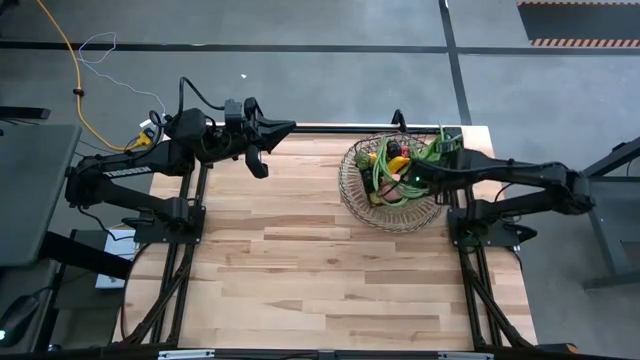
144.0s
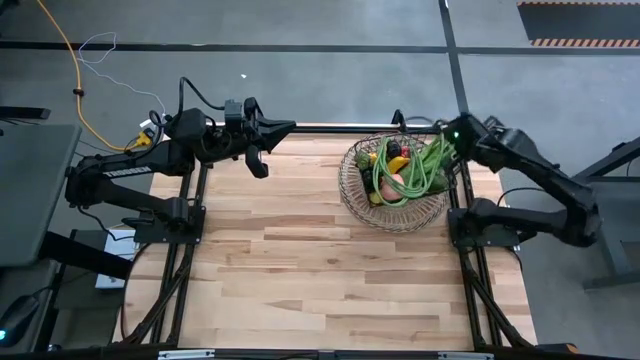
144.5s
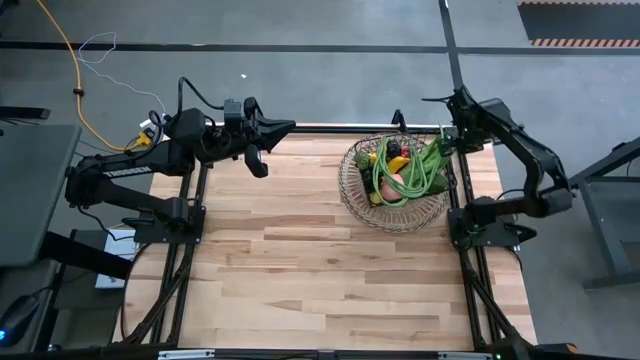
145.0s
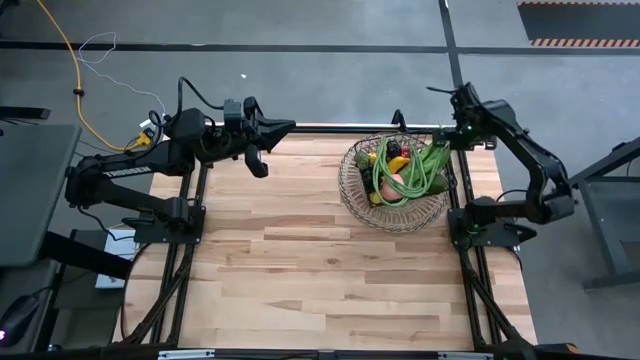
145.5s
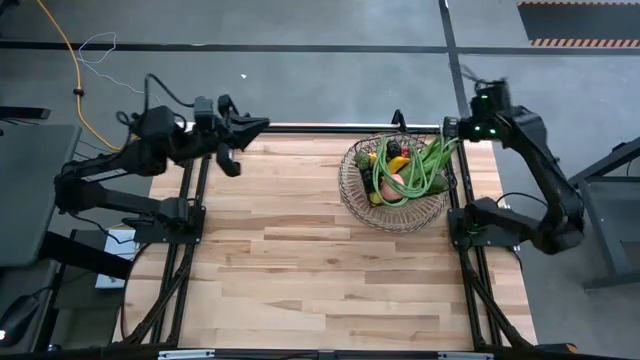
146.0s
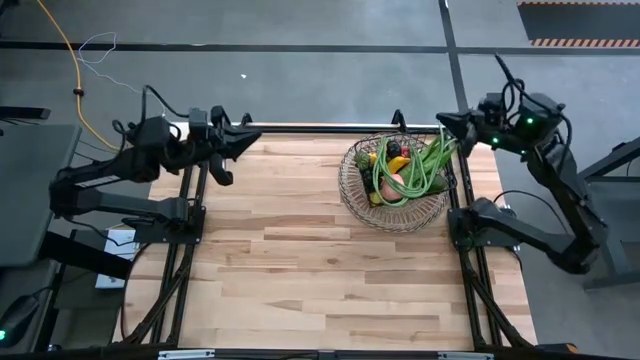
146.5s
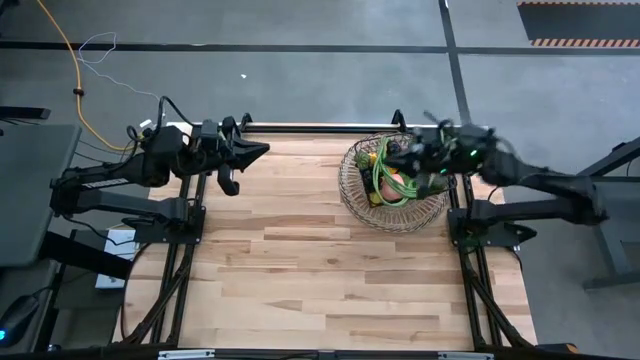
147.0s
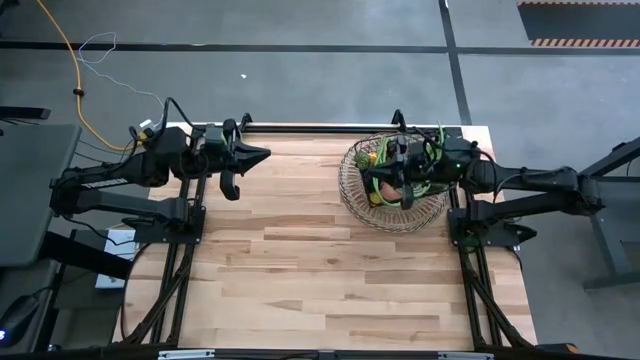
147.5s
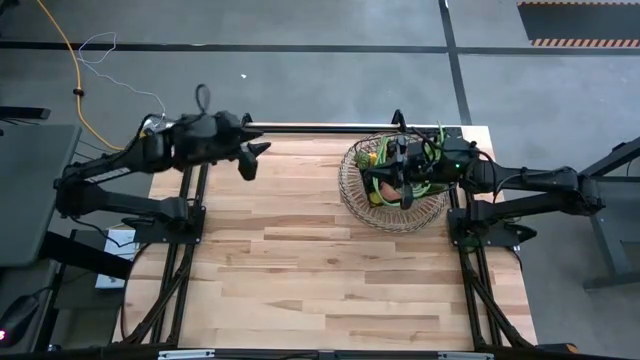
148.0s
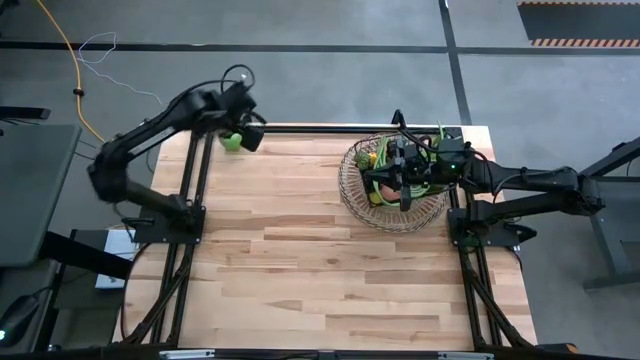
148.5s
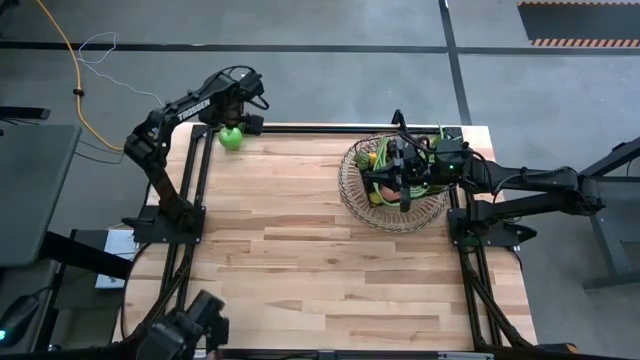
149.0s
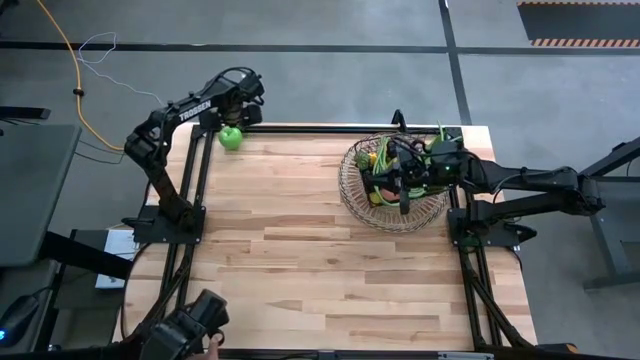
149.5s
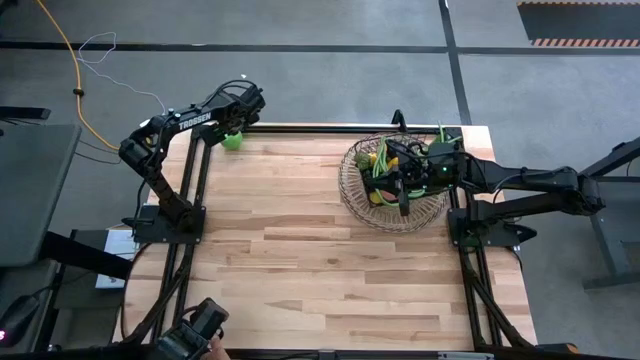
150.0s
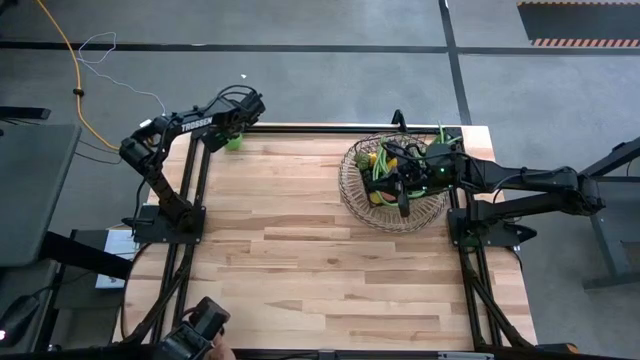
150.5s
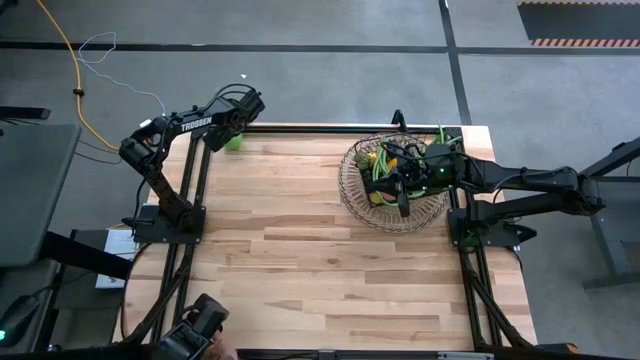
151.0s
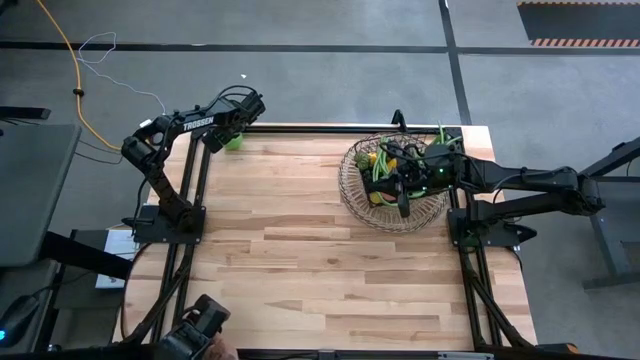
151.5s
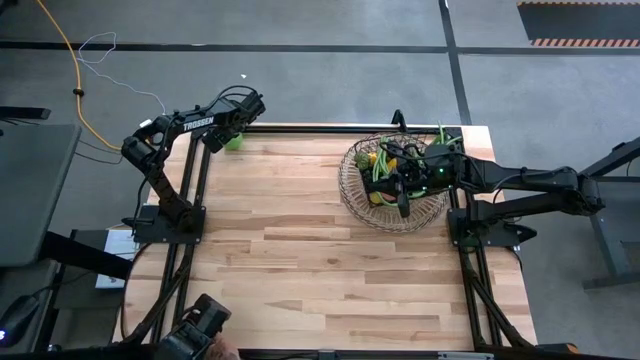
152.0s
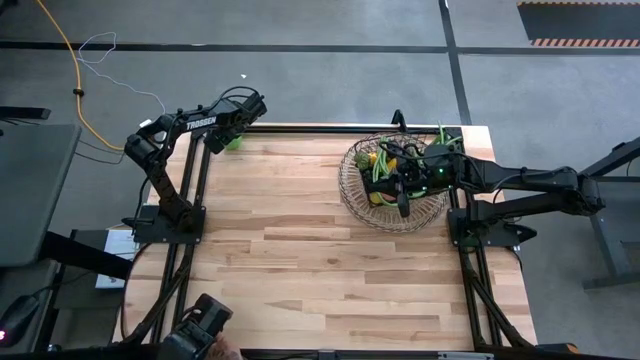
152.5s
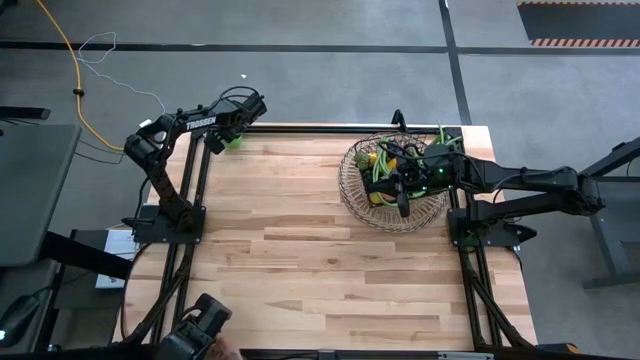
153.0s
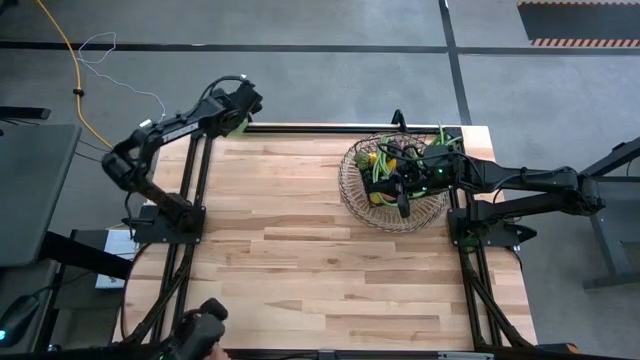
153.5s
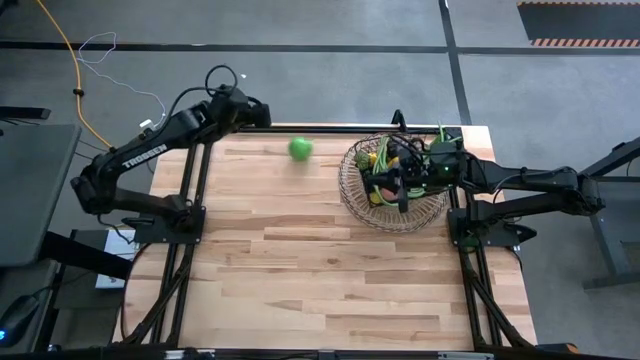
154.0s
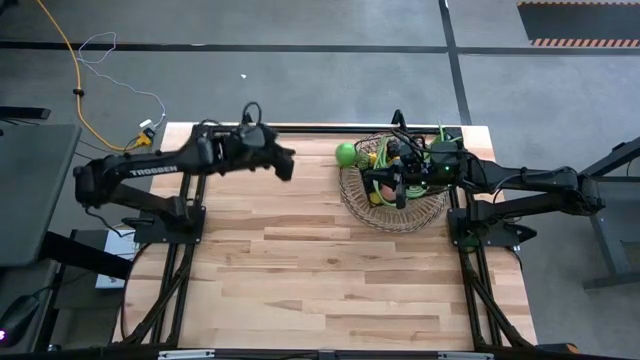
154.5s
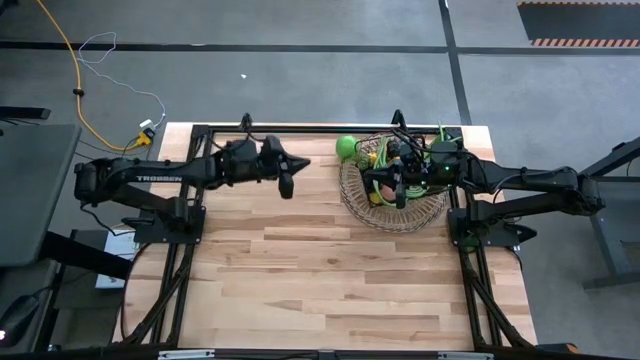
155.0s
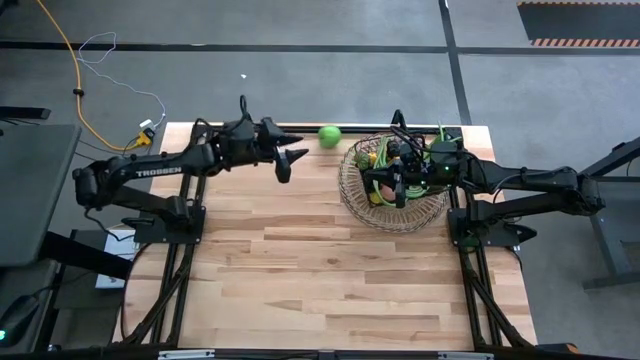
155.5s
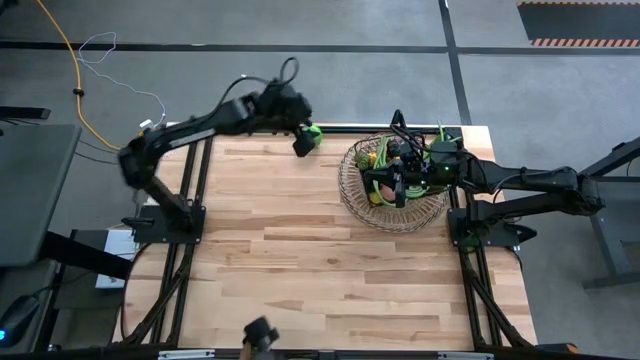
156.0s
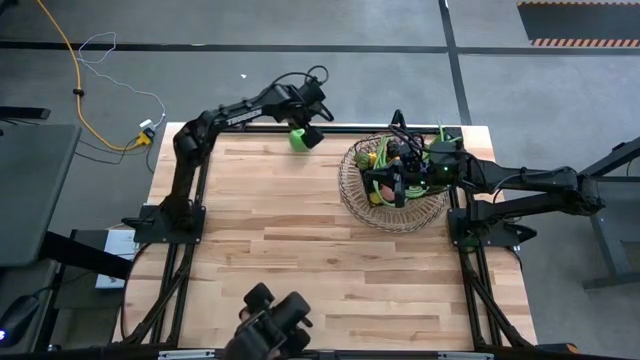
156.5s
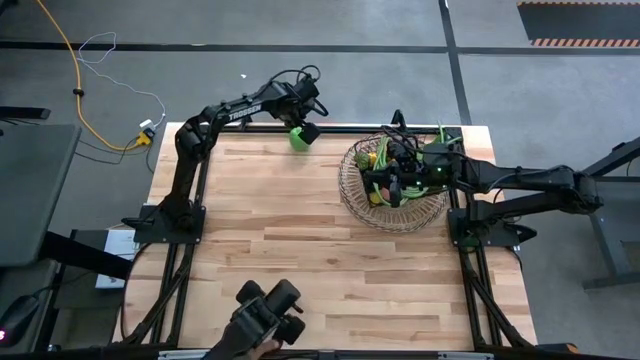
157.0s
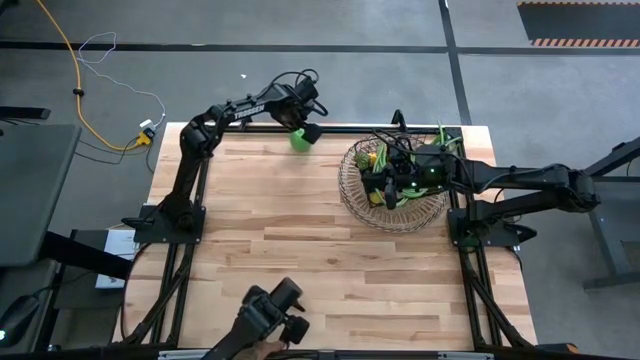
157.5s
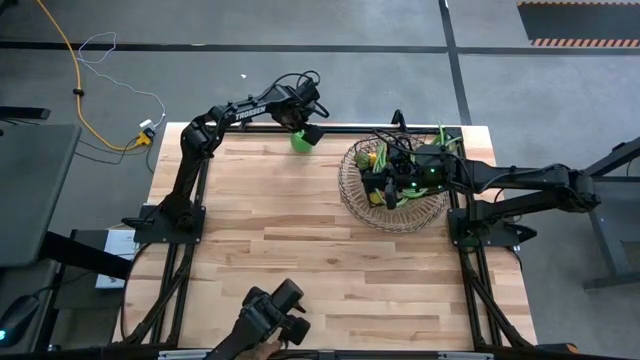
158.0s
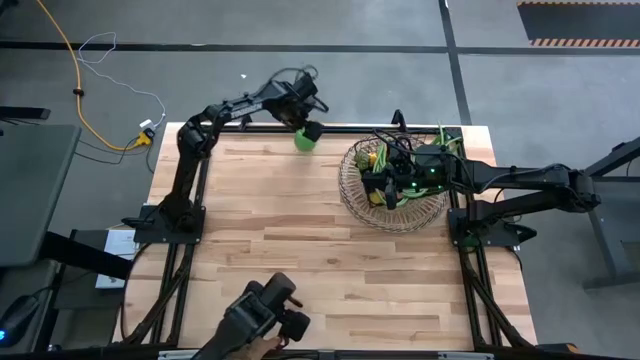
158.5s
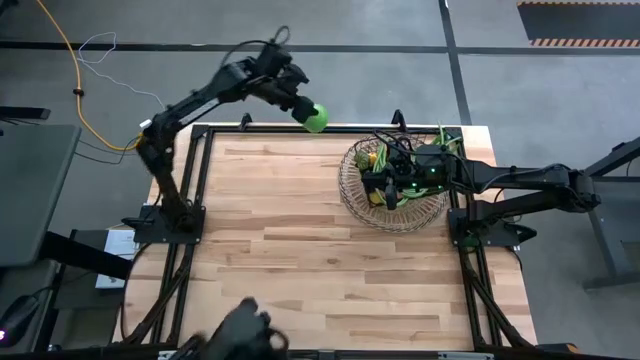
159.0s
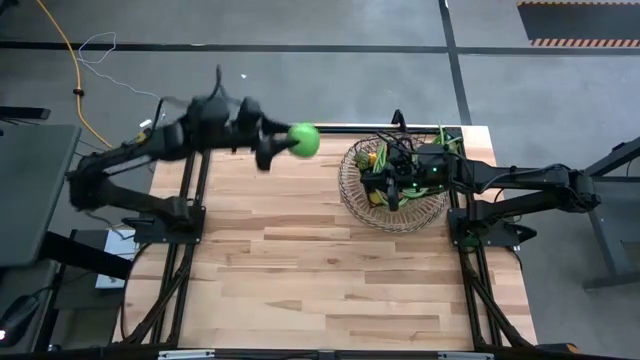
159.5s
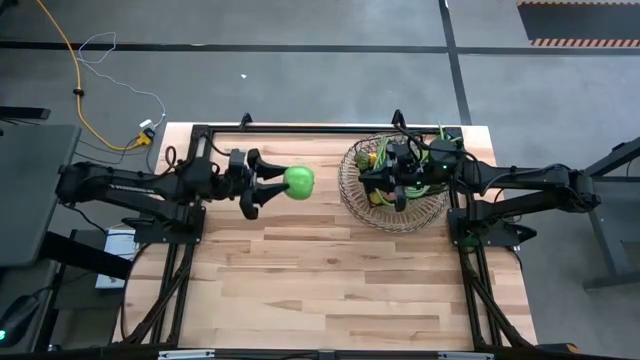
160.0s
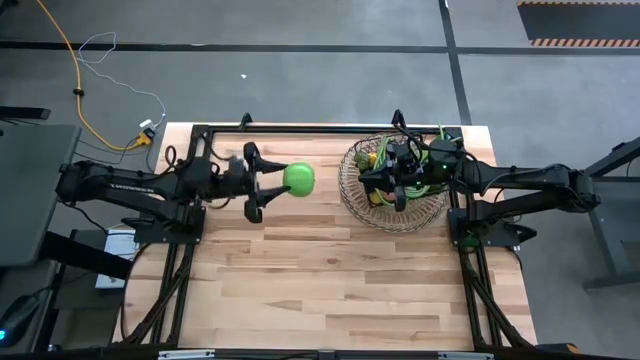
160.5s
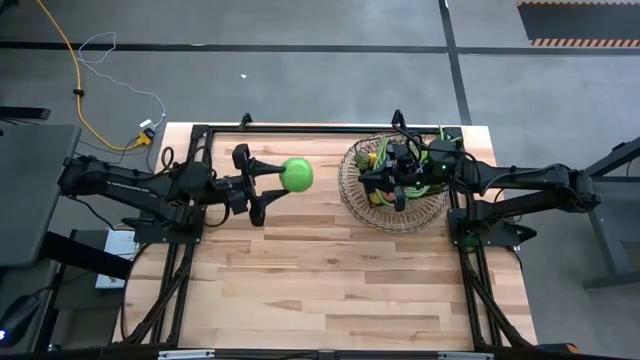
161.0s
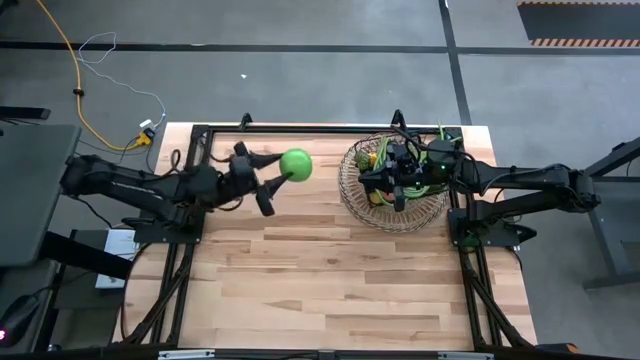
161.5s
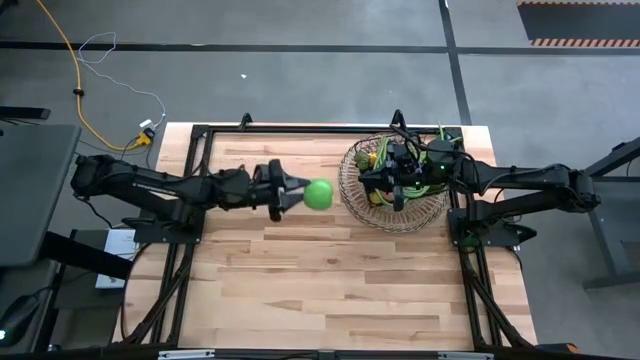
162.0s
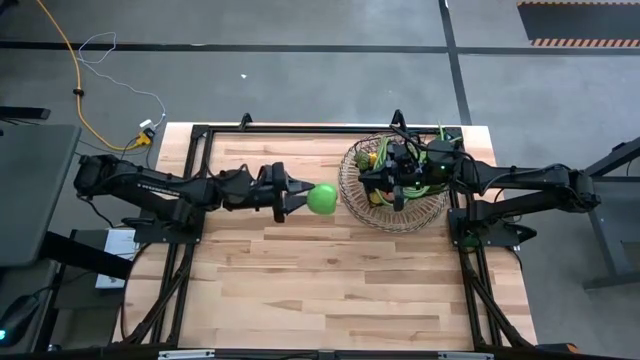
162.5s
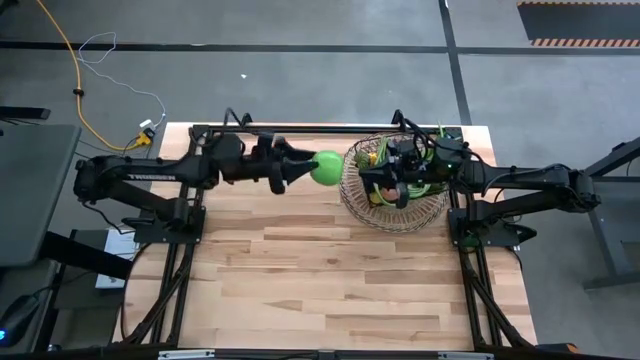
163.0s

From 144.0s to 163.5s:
Task: Build produce basket
Put the green apple into the wire basket

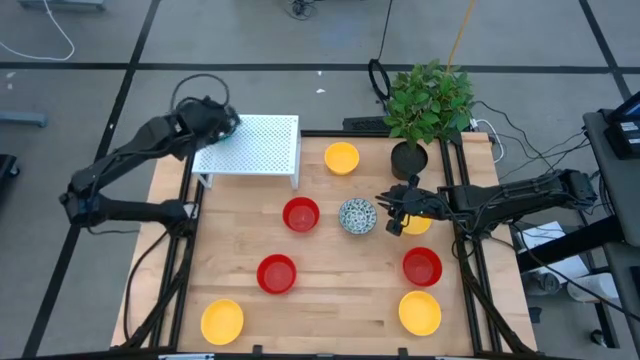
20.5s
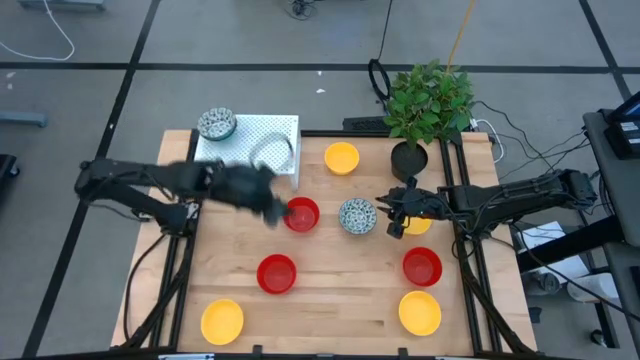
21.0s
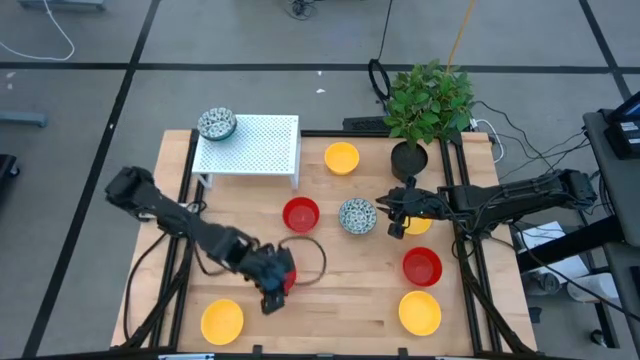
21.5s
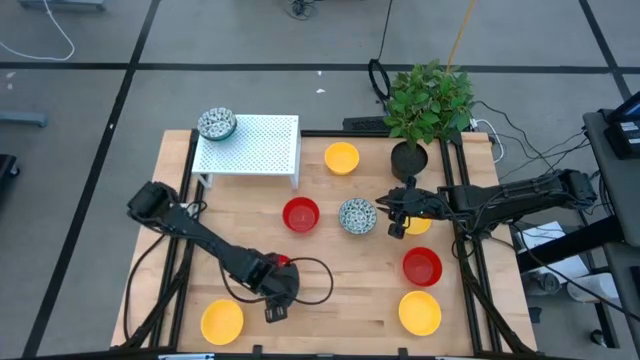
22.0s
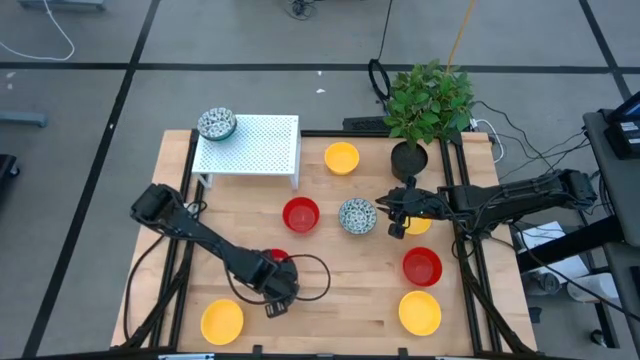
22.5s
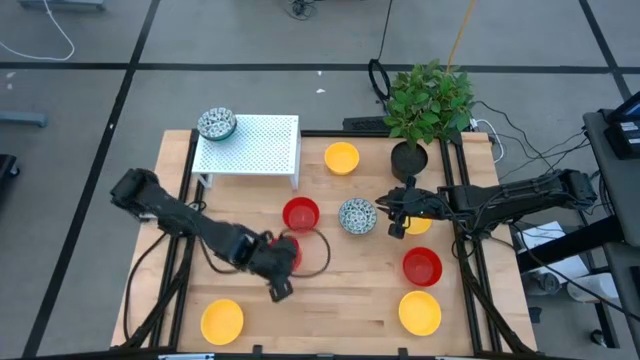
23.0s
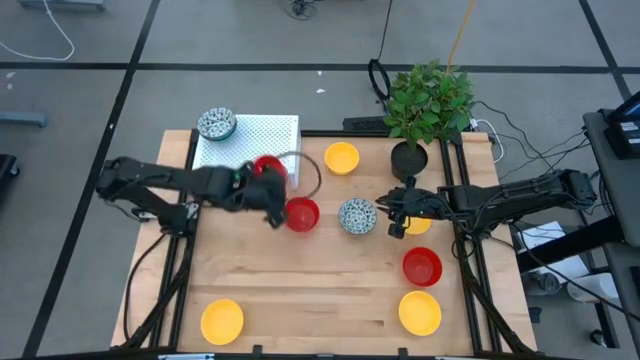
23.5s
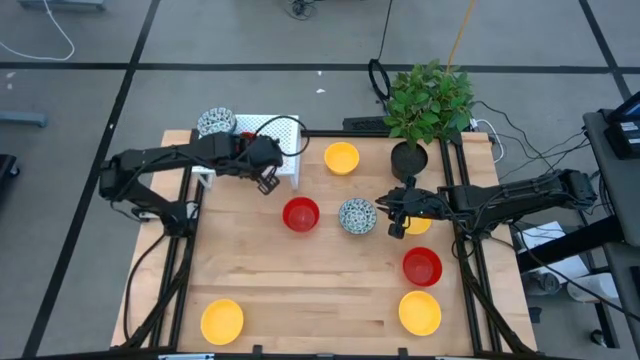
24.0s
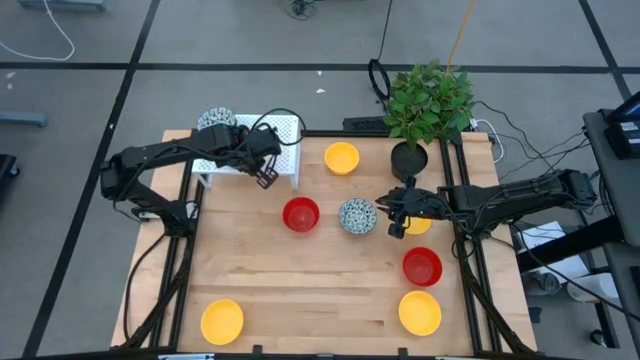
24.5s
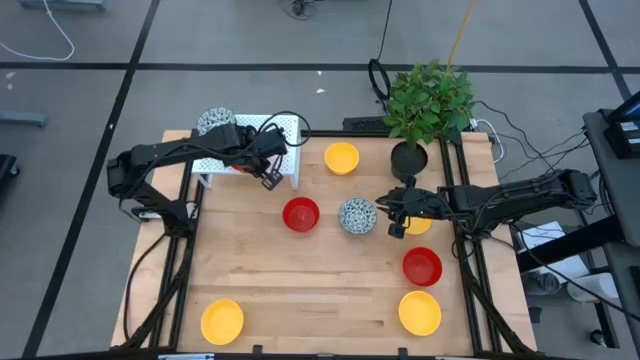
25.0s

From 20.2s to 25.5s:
Task: Pick & Place Mini bowls
Put the bottom left red bowl on the shelf
